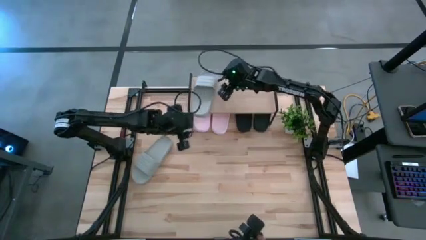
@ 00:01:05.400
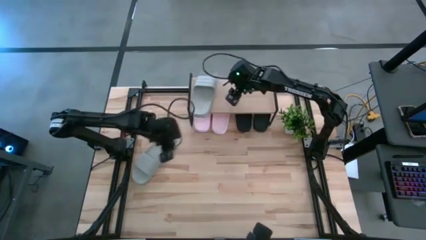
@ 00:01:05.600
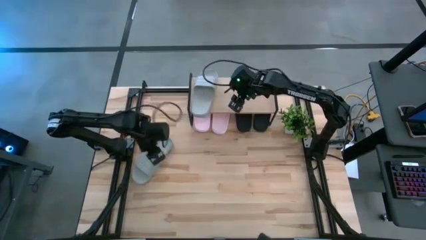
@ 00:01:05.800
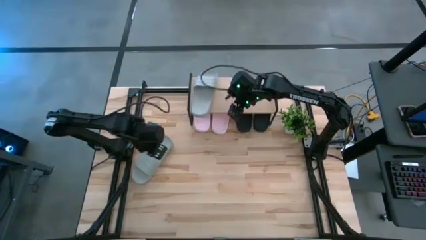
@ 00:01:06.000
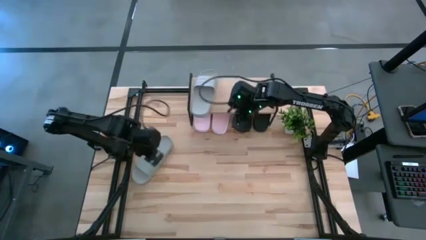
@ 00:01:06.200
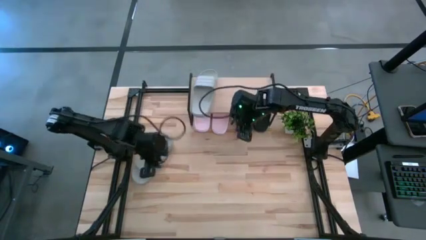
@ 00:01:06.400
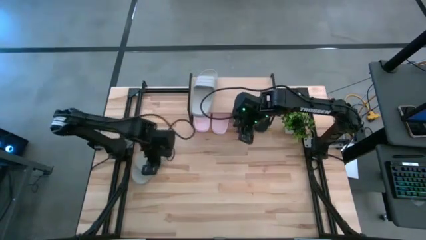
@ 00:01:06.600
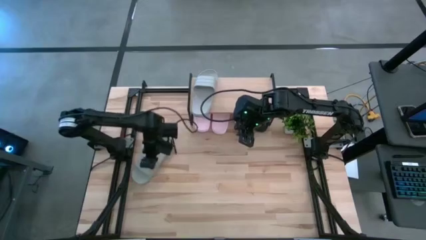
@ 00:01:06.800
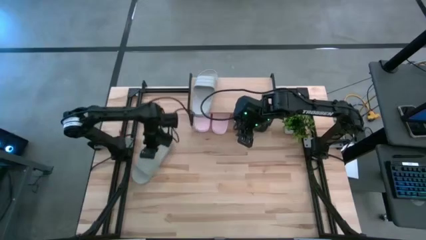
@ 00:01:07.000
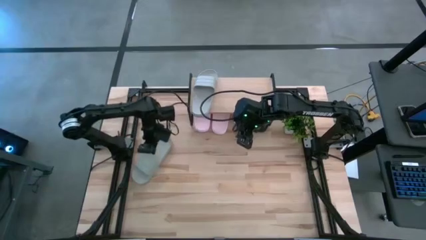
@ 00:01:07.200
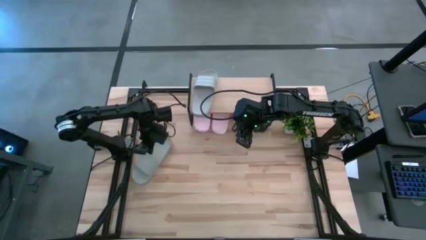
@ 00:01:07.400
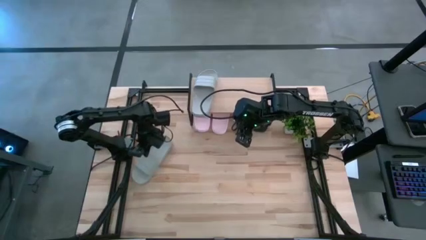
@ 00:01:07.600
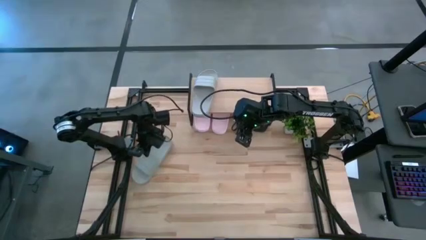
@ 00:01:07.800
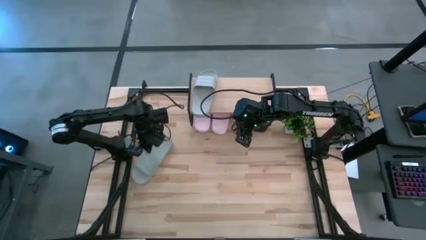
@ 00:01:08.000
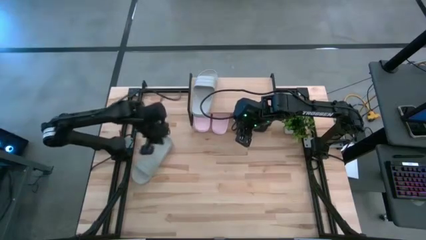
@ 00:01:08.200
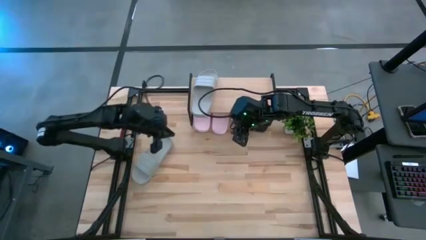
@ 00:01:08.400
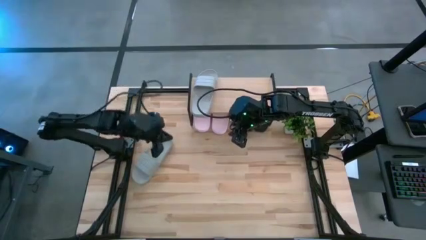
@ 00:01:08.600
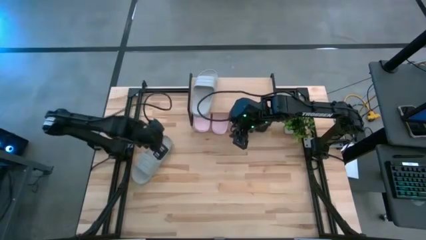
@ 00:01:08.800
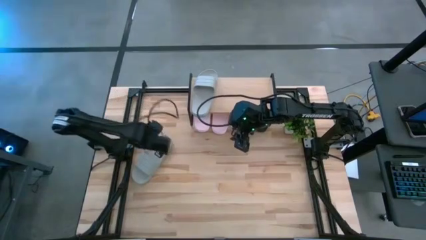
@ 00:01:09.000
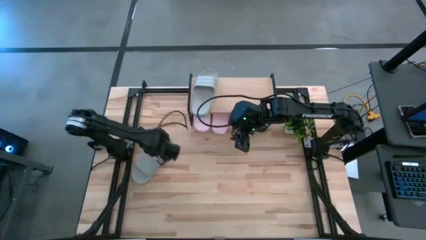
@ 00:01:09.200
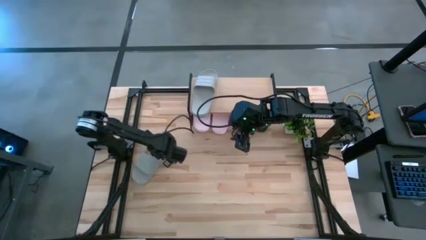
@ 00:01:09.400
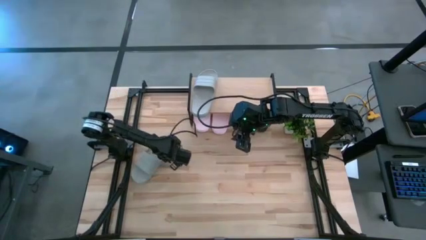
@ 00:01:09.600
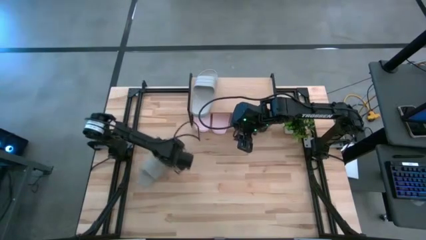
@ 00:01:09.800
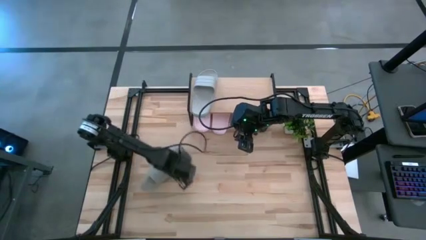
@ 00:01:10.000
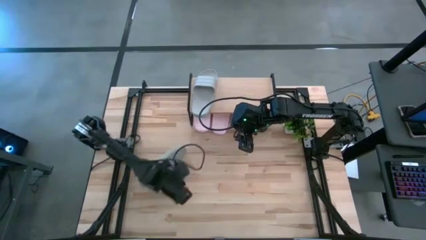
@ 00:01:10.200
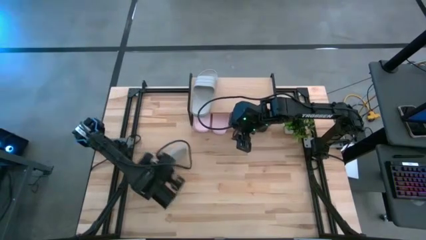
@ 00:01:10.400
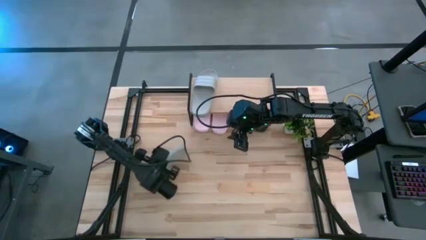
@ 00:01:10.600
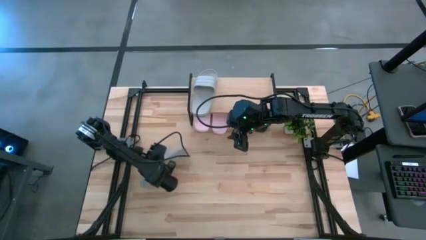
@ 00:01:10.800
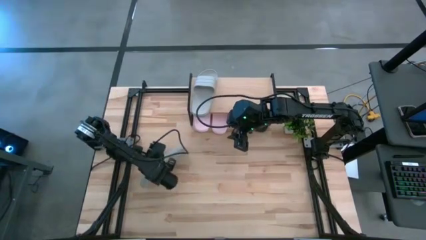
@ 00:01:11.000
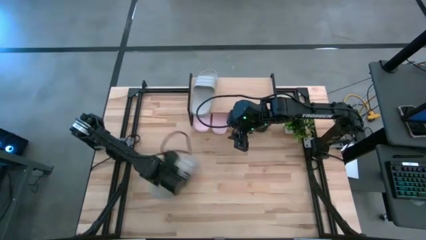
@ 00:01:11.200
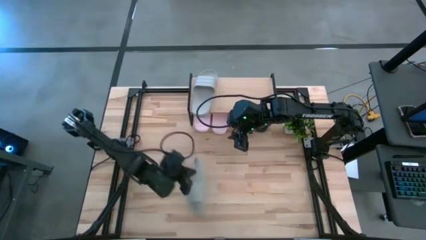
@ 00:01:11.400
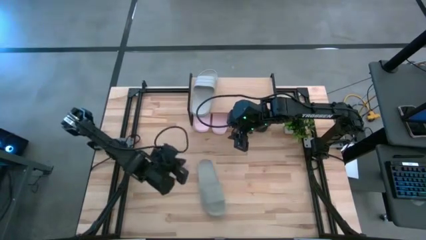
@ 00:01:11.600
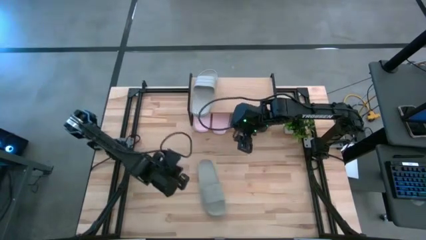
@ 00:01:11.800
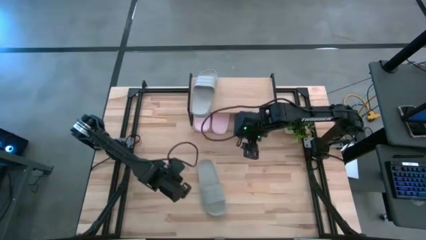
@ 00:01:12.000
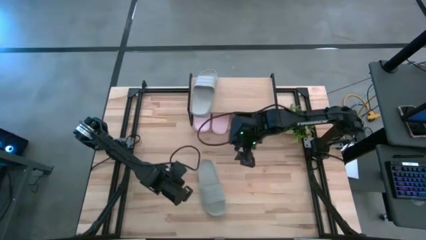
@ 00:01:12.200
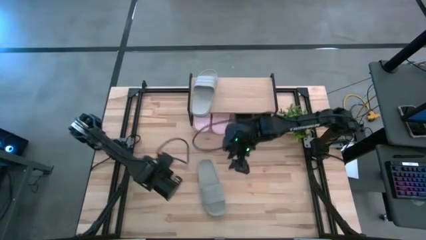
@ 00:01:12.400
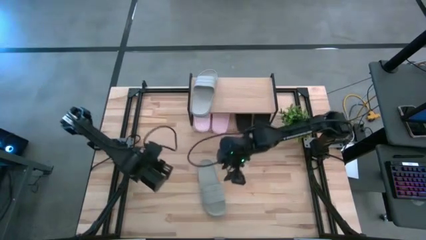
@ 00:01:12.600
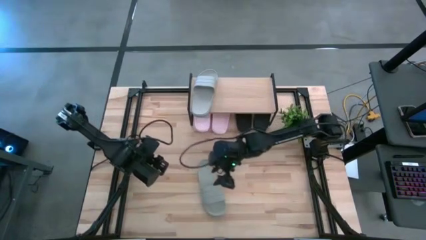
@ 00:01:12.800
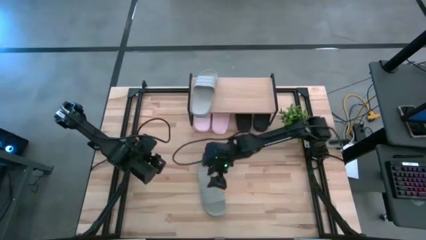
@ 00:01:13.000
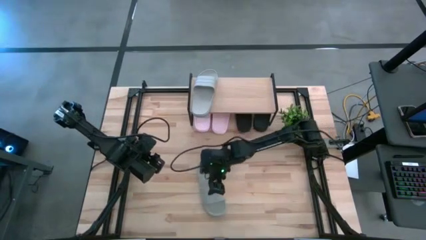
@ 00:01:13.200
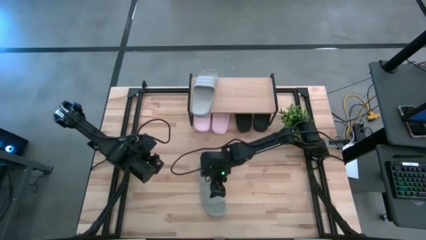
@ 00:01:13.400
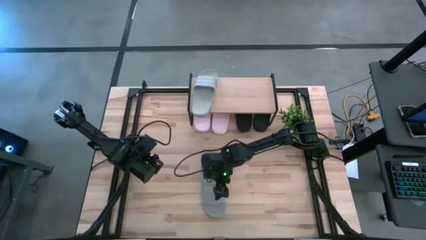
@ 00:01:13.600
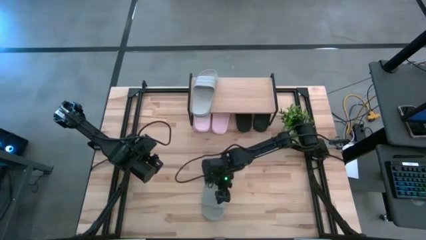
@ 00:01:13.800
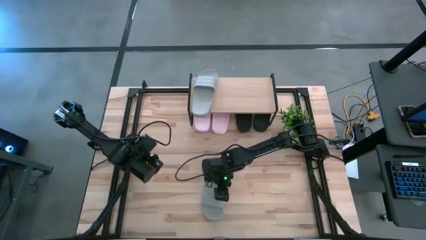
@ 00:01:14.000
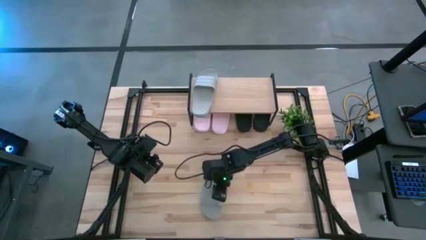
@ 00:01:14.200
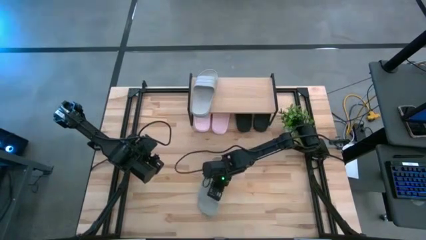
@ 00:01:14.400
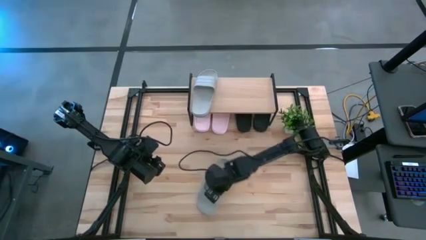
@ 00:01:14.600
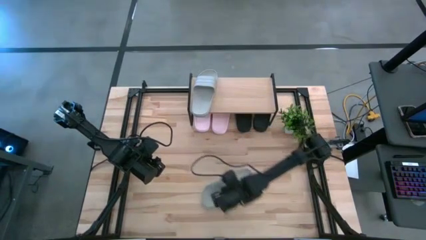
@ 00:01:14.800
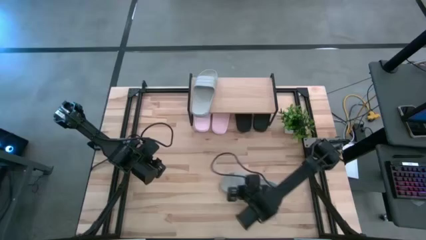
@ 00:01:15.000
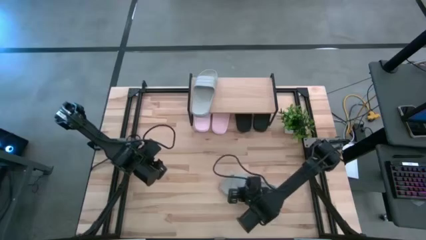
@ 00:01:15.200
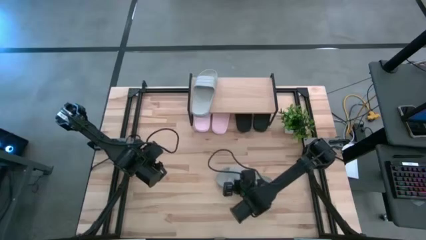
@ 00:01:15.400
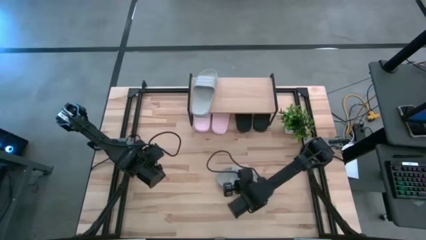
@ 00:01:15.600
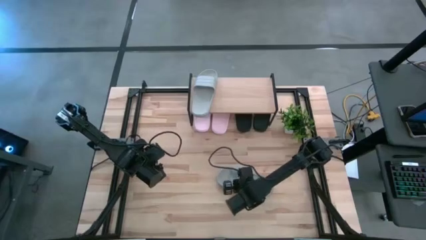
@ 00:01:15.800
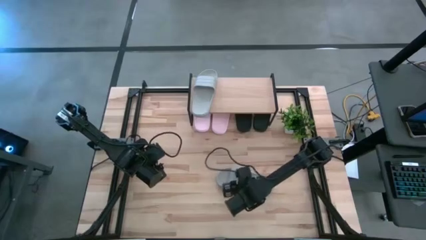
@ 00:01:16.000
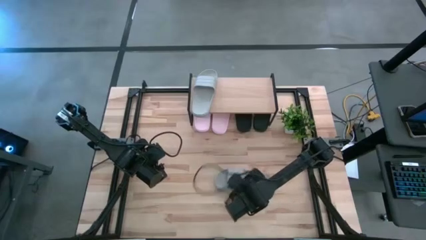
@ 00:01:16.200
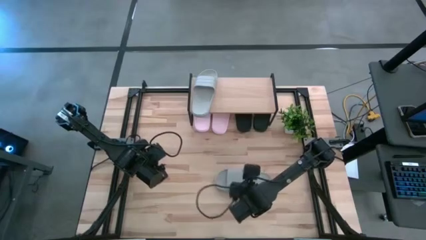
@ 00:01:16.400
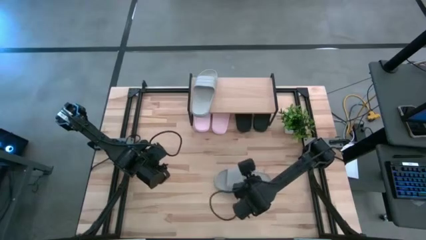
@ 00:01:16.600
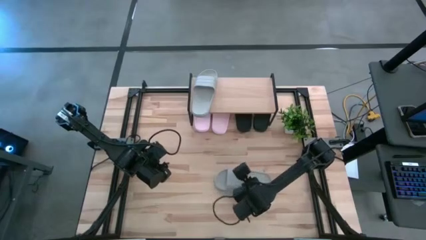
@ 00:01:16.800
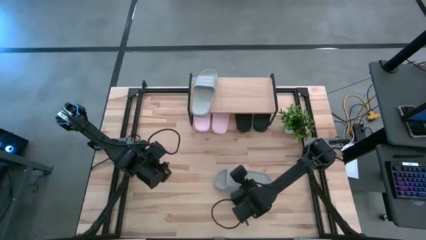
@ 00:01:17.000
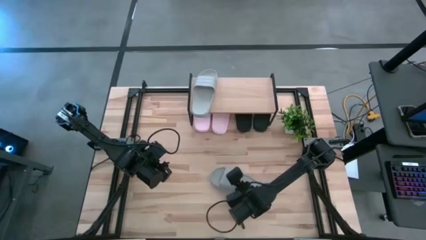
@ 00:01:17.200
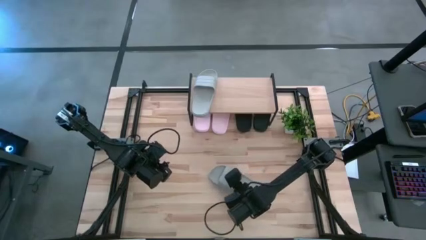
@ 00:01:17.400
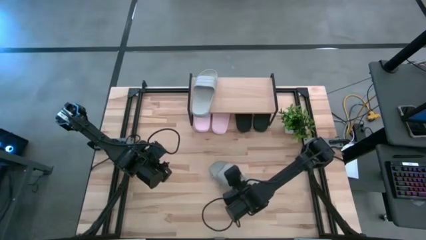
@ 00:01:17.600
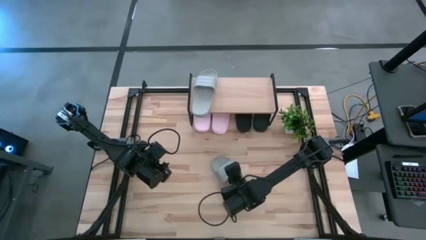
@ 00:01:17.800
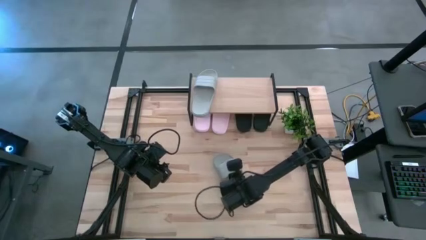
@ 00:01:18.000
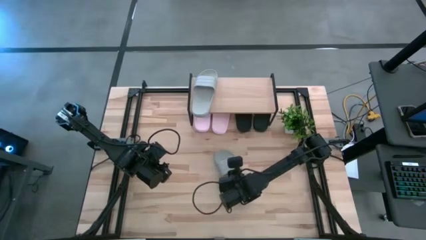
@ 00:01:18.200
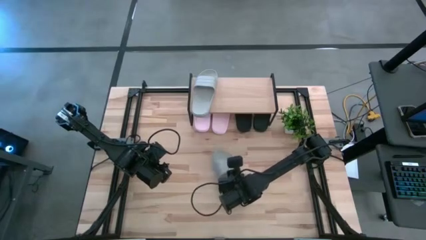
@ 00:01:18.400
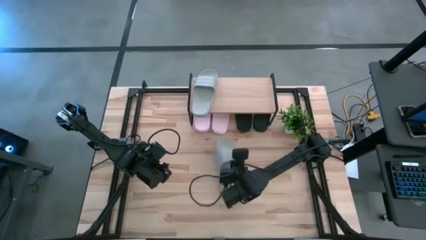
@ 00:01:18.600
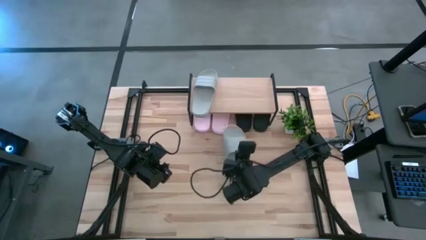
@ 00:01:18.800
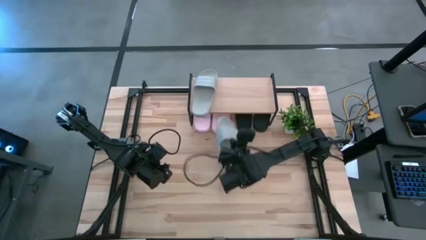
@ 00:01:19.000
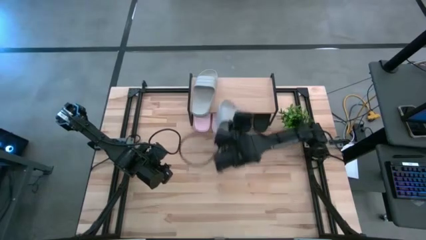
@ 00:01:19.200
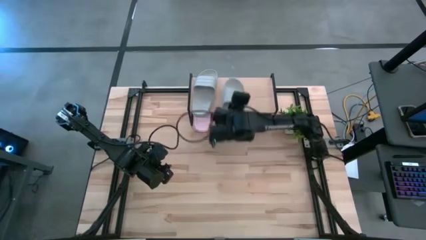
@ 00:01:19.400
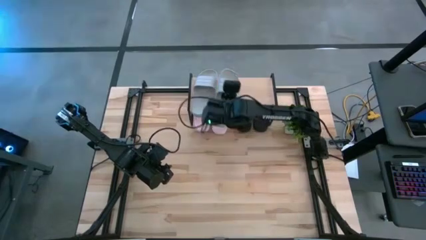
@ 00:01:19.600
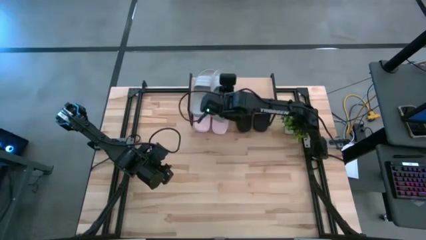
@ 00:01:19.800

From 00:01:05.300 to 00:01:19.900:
Task: Pick and place slides into the shelf
Put the right gray slide on the shelf
